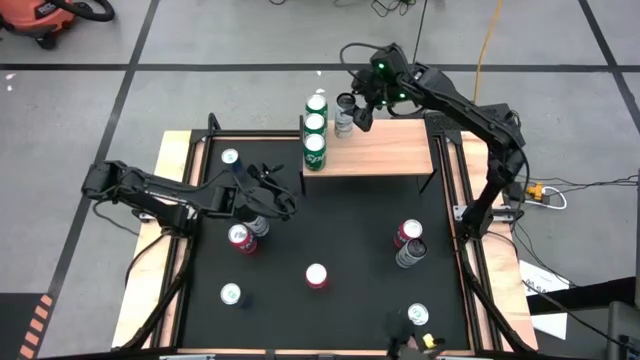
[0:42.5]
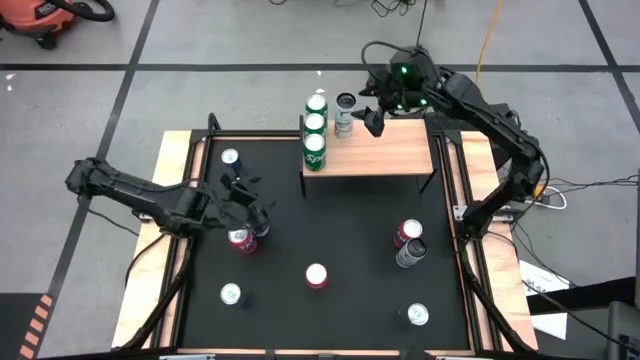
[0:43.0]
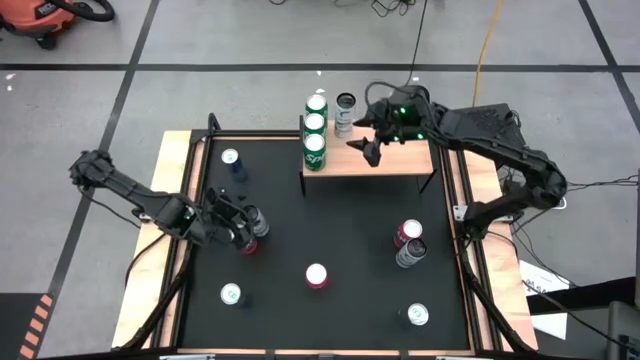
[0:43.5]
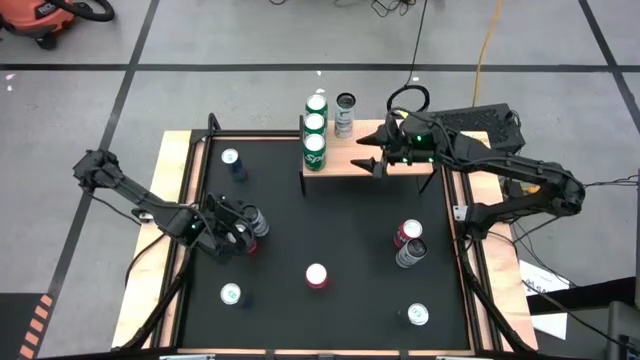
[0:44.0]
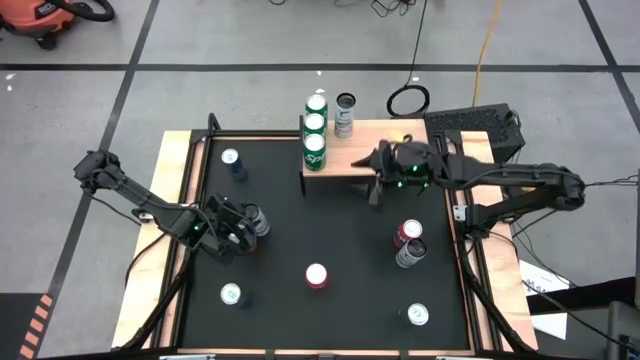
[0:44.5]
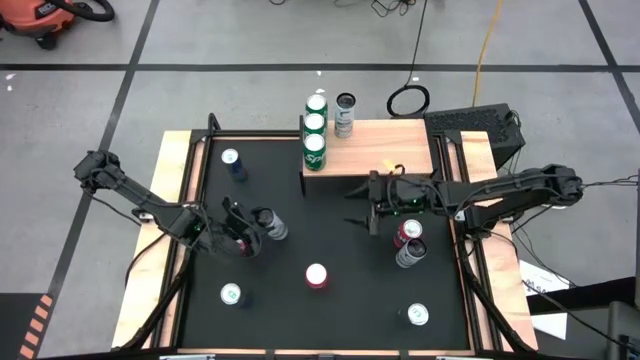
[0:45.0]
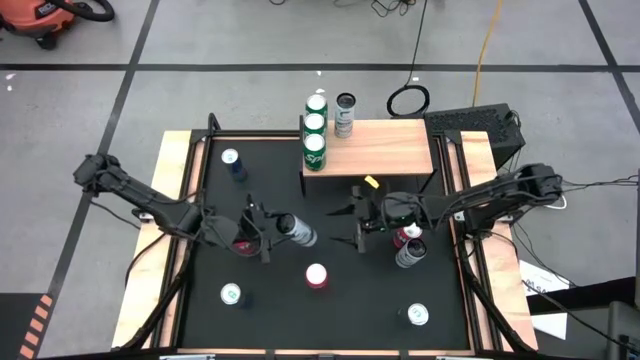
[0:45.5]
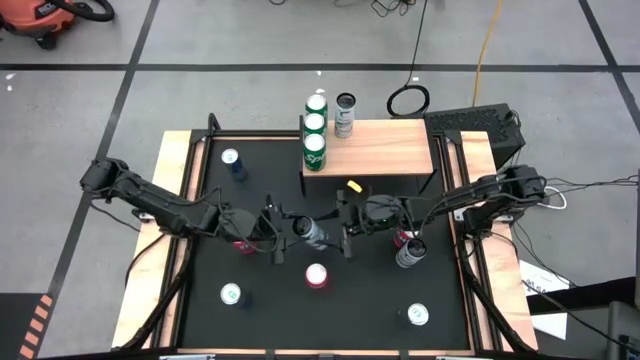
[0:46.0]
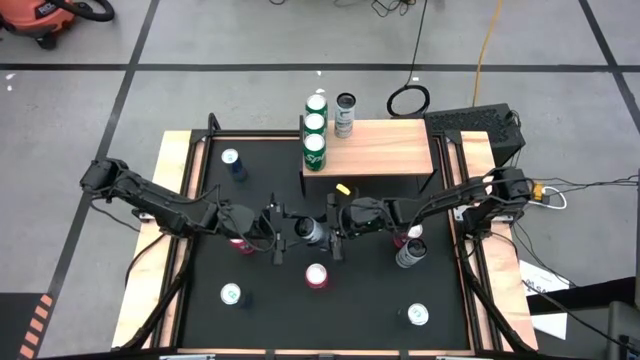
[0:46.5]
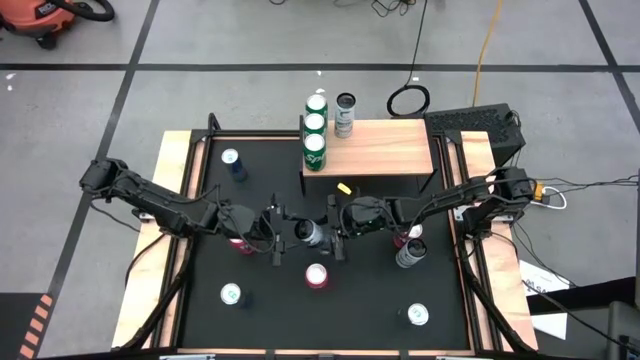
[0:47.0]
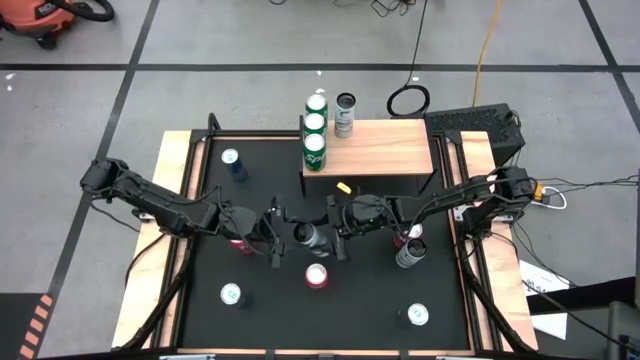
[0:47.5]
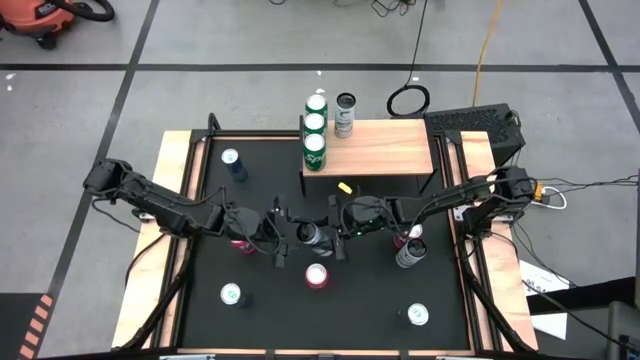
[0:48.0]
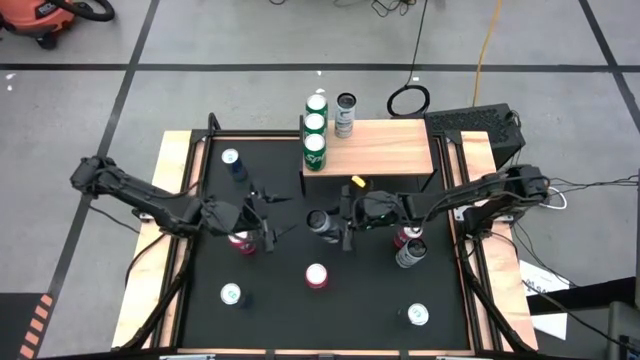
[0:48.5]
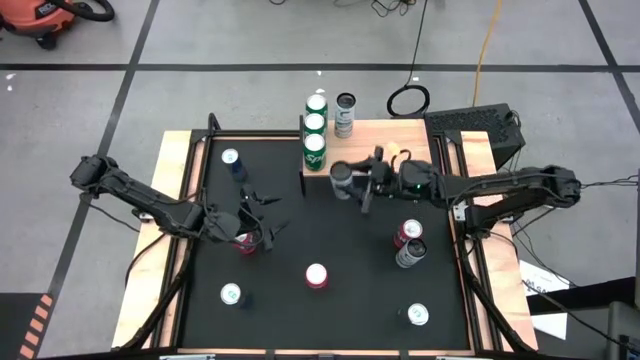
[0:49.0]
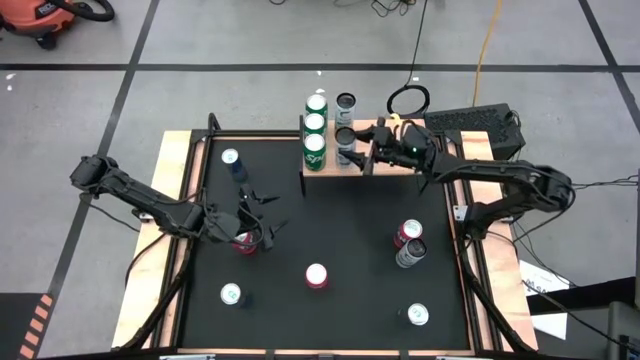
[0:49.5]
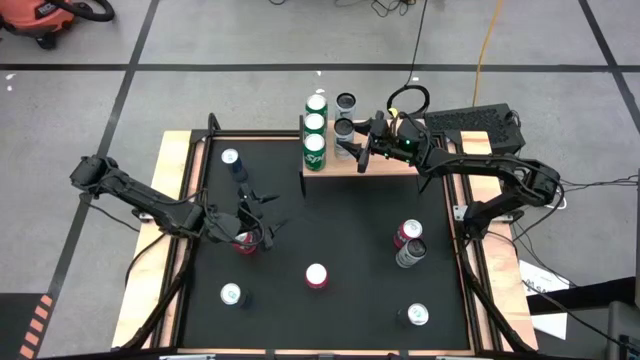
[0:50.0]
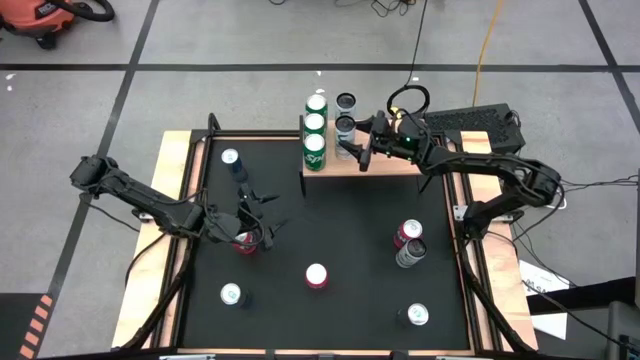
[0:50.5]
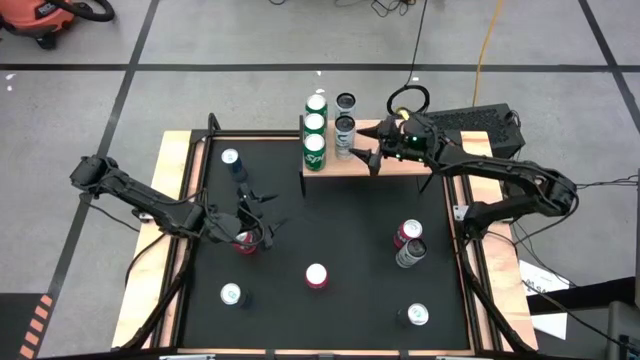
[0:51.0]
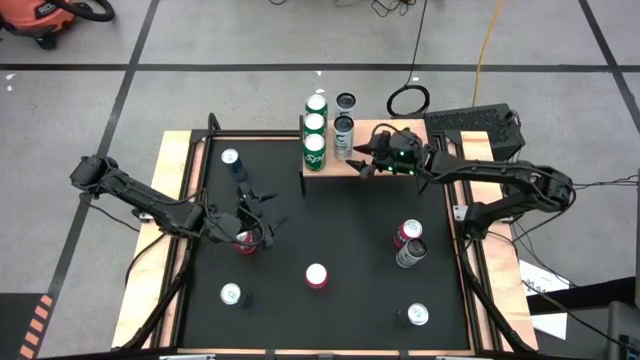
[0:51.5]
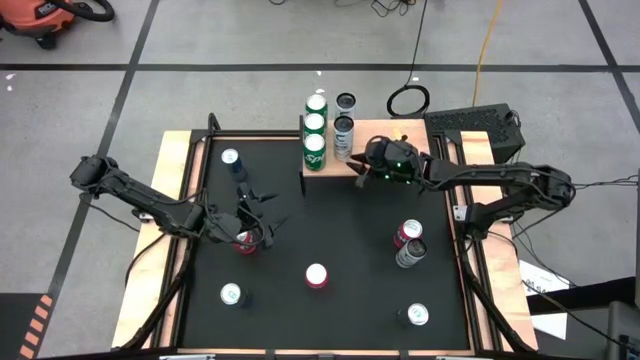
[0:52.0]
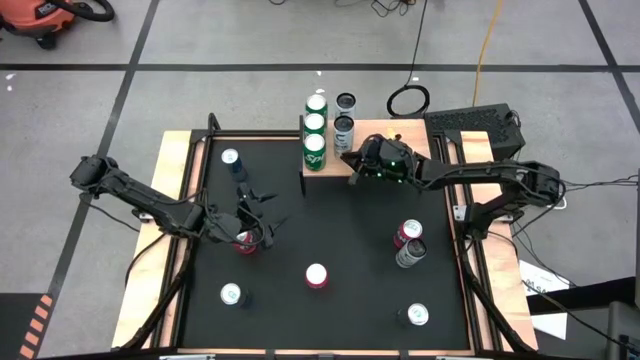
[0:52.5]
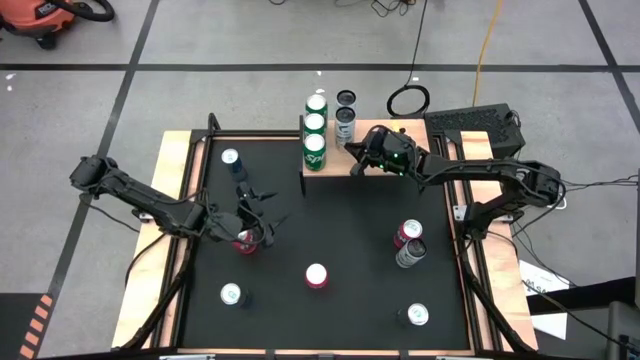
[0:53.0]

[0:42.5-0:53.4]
Task: Place canned beverage on shelf
Put the left black soda can on the shelf

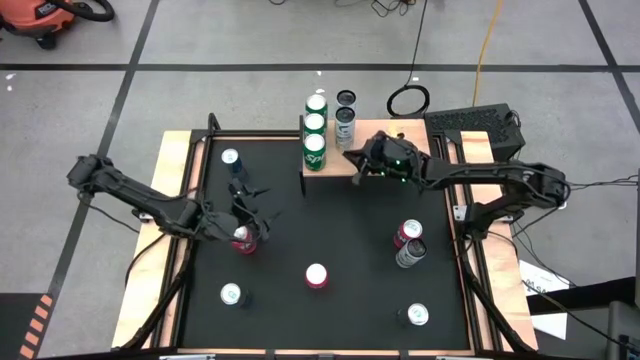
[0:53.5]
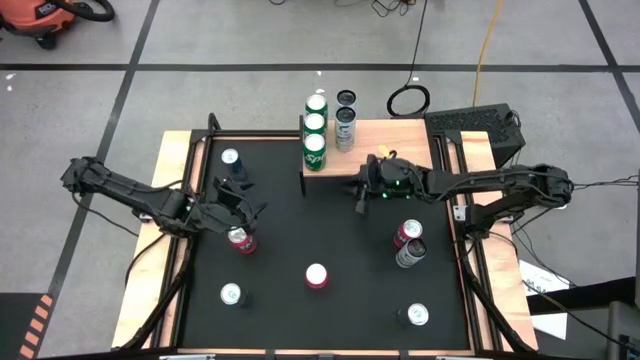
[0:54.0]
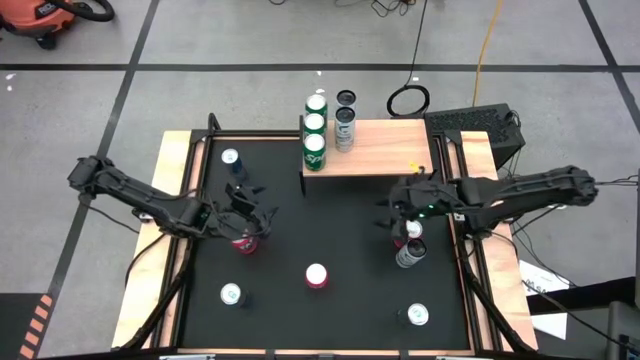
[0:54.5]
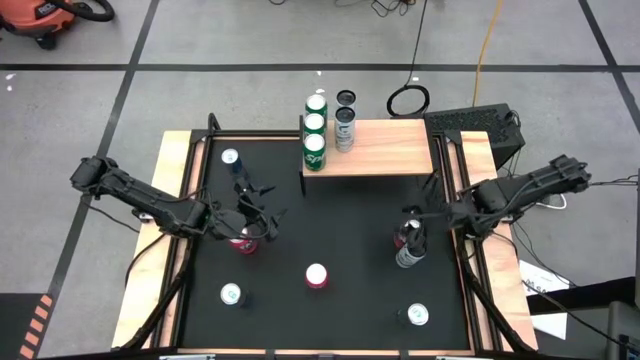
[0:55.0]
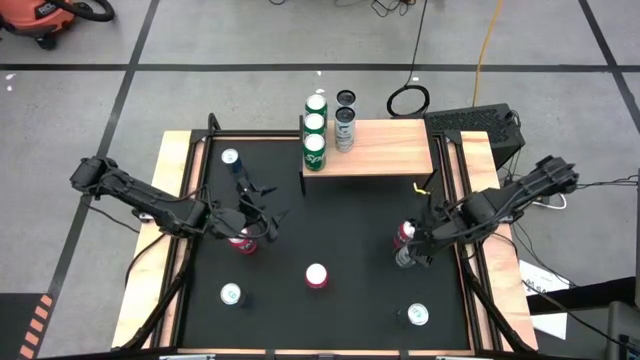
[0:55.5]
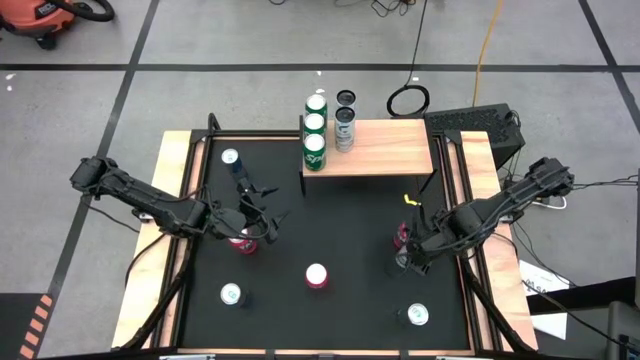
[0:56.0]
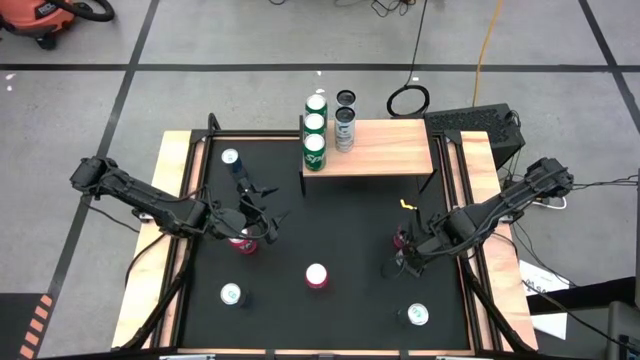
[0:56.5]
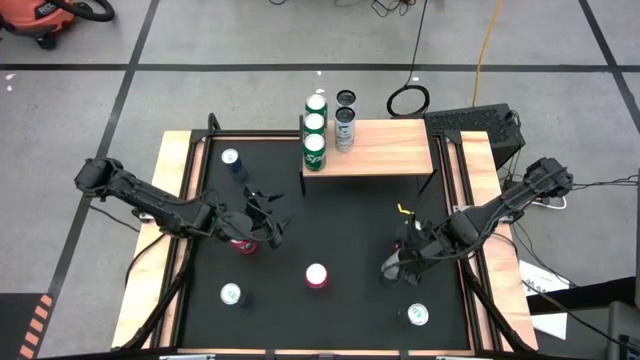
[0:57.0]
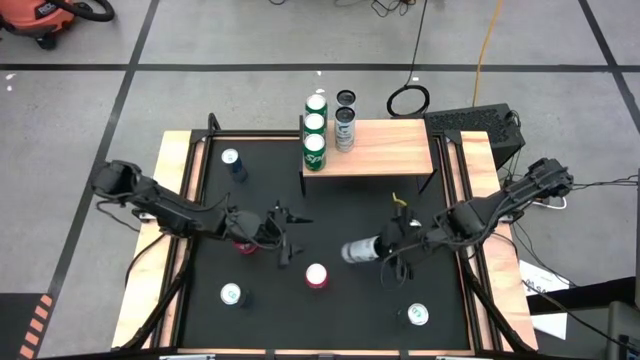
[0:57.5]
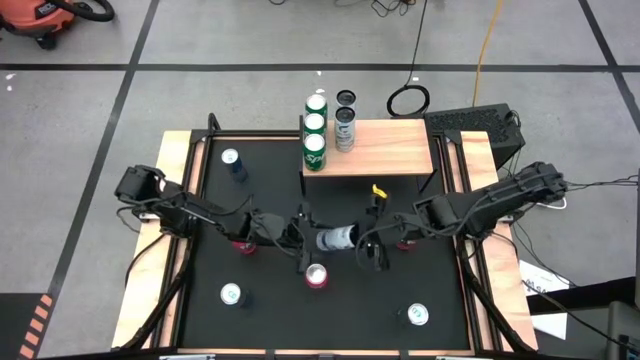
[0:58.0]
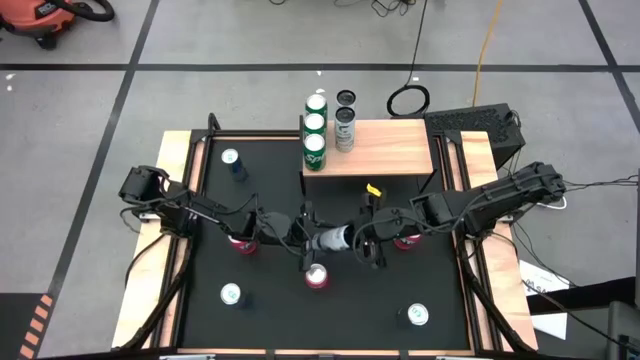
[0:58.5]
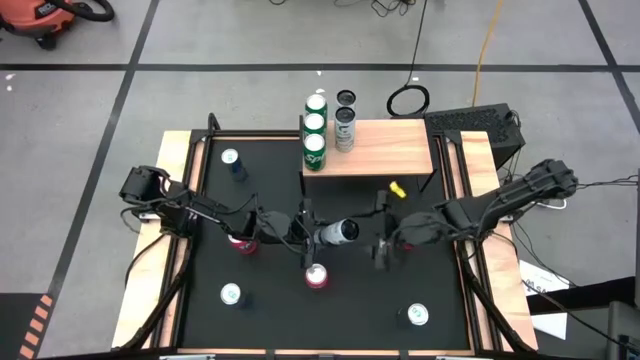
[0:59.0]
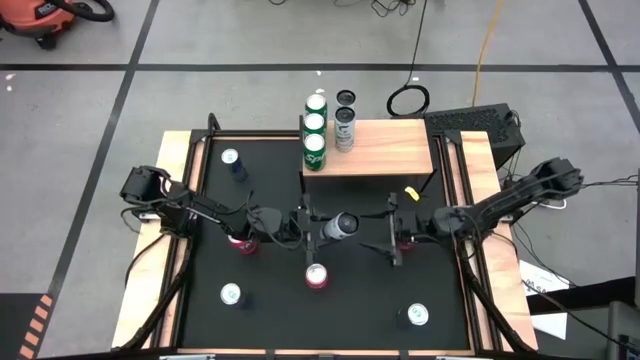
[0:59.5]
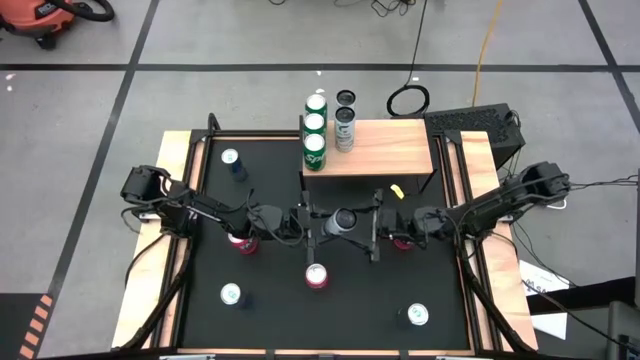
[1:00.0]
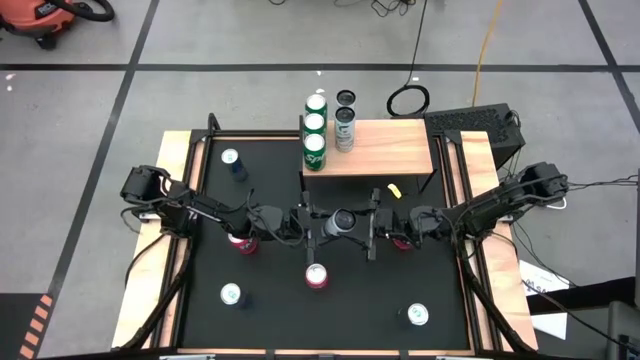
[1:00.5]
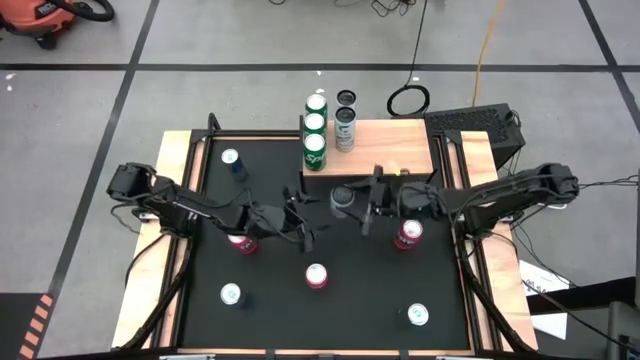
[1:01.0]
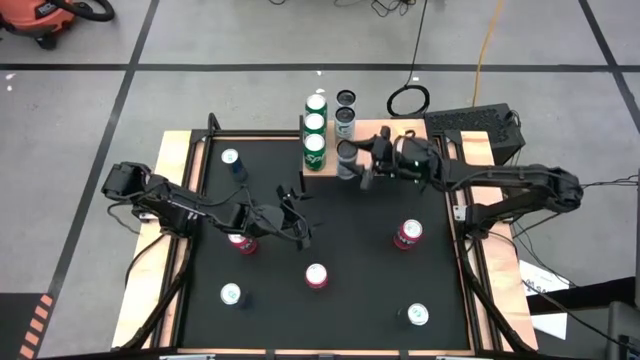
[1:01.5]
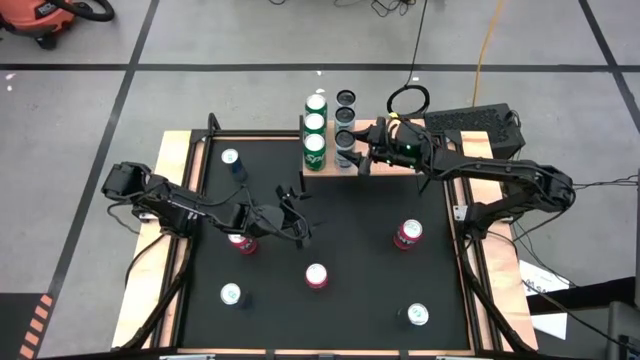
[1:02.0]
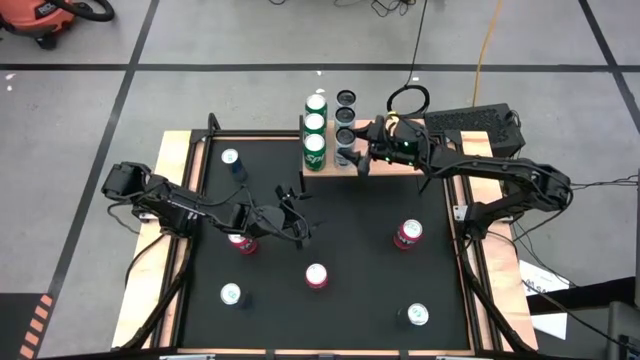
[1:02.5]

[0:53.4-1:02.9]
Put the black soda can on the shelf
